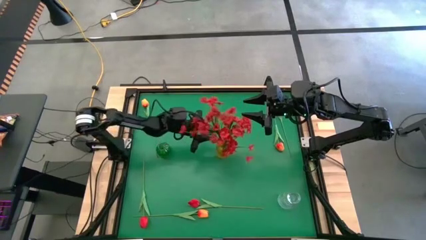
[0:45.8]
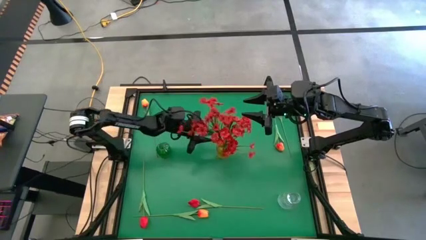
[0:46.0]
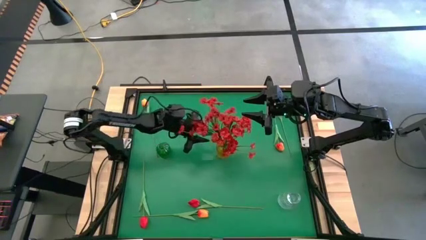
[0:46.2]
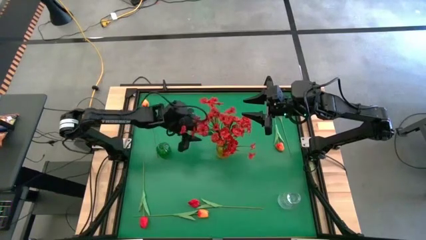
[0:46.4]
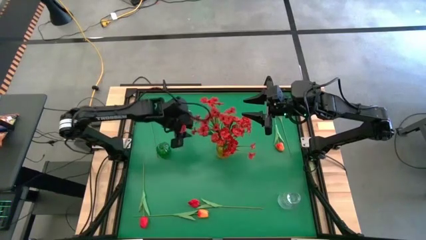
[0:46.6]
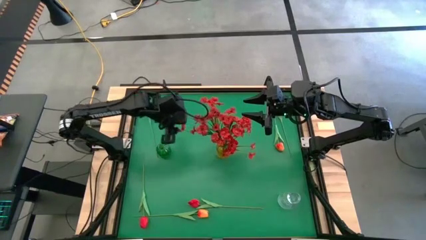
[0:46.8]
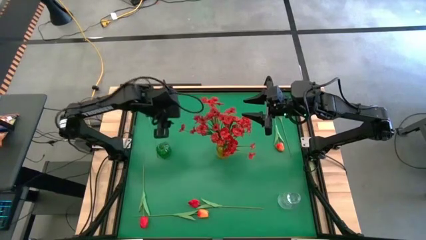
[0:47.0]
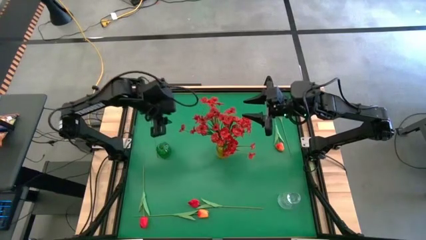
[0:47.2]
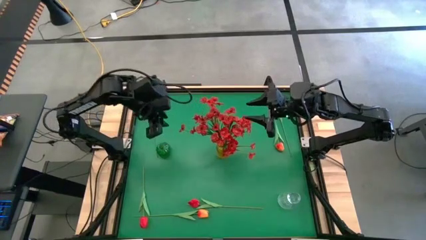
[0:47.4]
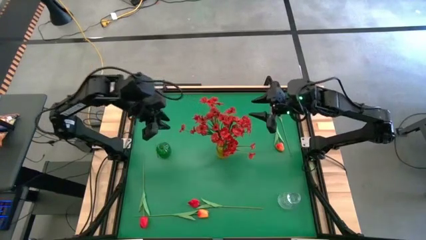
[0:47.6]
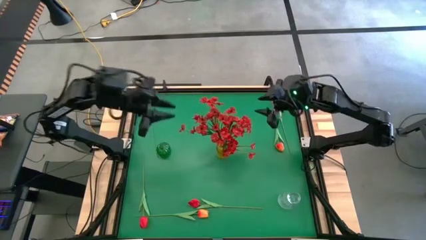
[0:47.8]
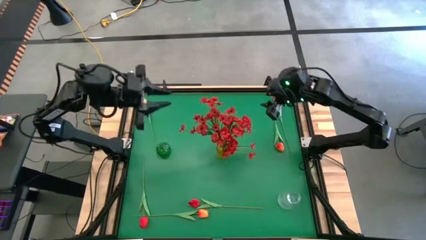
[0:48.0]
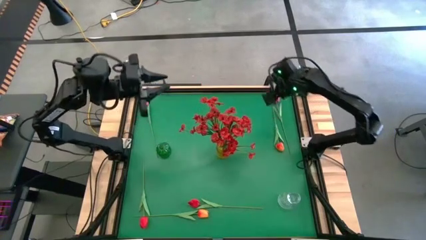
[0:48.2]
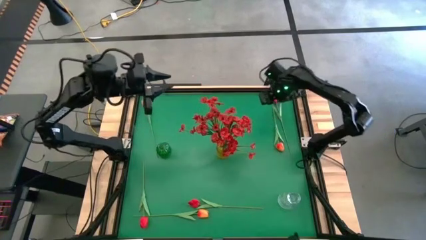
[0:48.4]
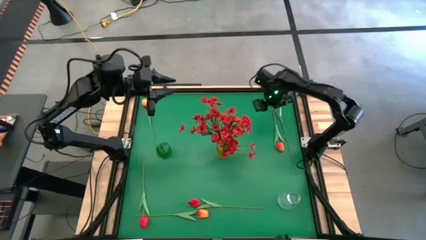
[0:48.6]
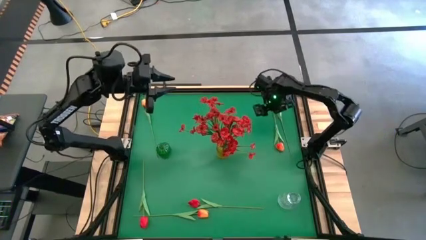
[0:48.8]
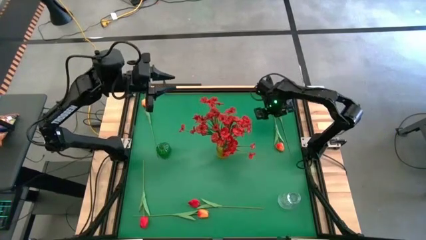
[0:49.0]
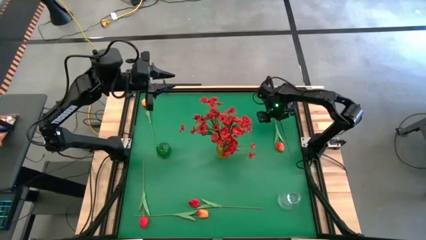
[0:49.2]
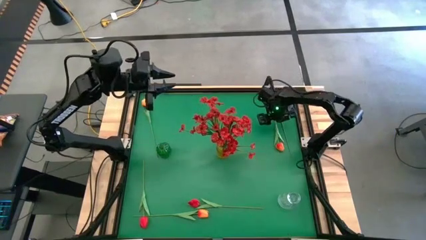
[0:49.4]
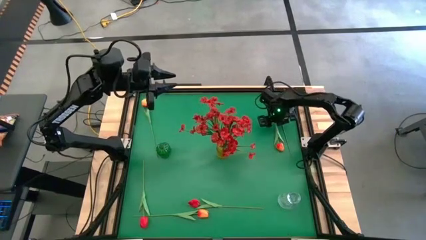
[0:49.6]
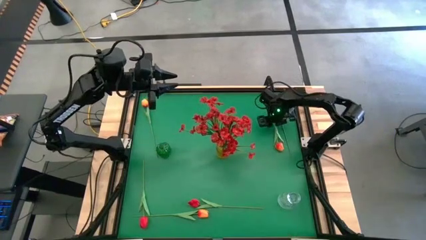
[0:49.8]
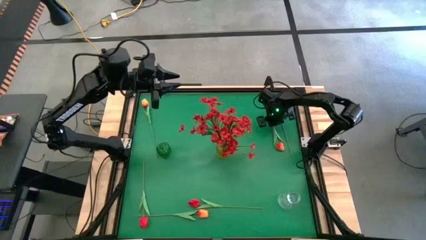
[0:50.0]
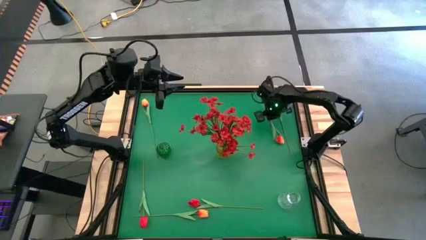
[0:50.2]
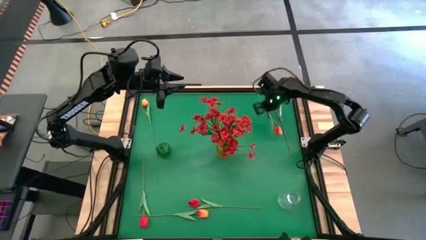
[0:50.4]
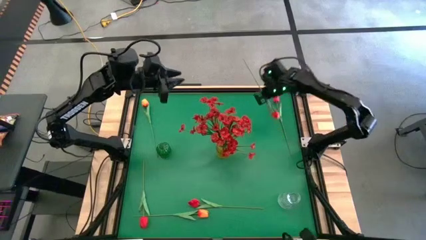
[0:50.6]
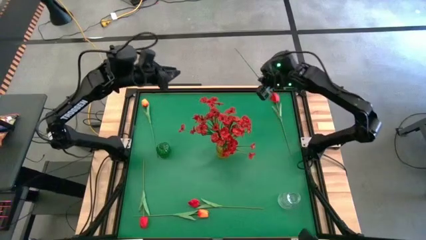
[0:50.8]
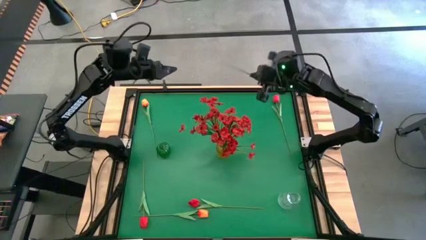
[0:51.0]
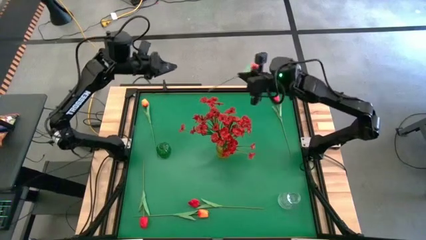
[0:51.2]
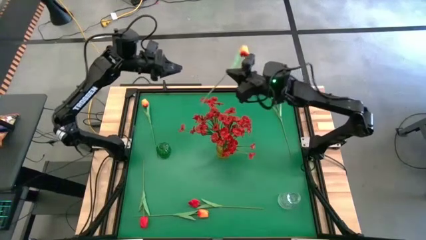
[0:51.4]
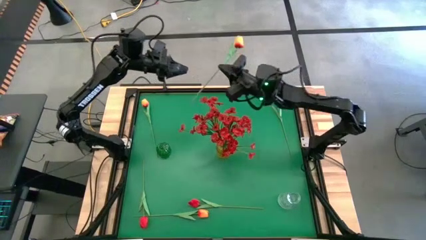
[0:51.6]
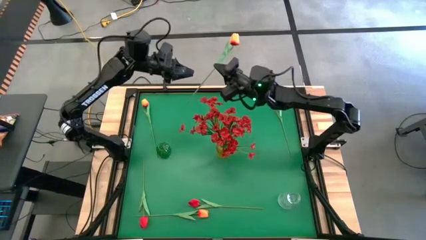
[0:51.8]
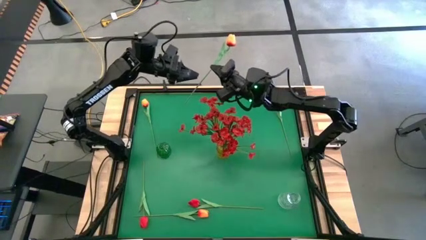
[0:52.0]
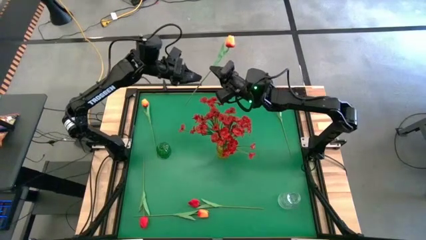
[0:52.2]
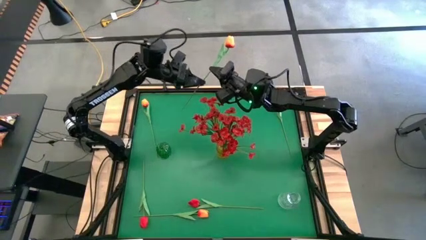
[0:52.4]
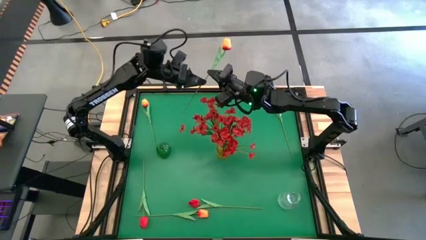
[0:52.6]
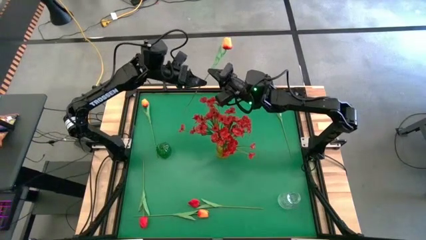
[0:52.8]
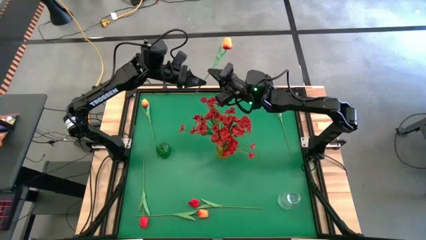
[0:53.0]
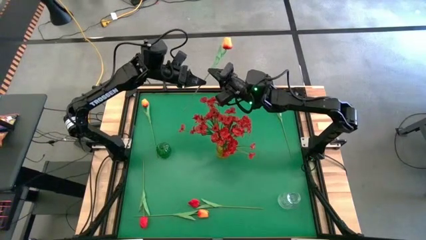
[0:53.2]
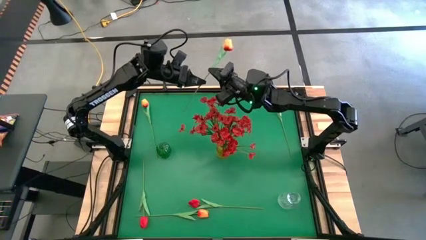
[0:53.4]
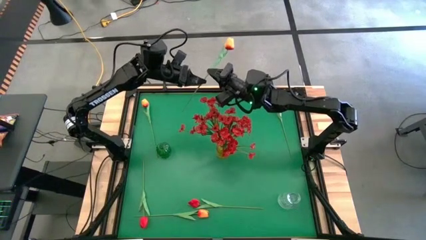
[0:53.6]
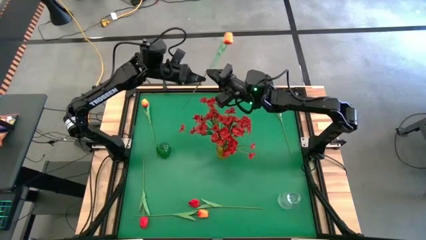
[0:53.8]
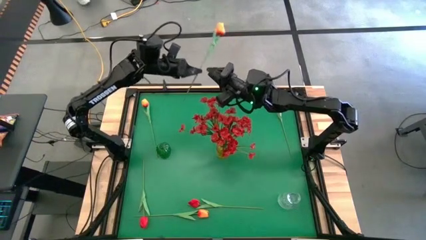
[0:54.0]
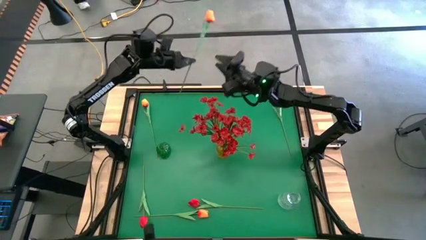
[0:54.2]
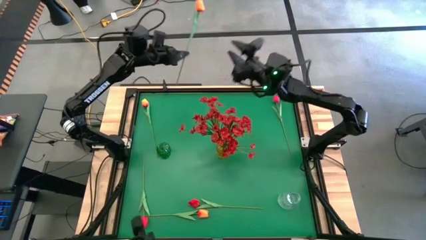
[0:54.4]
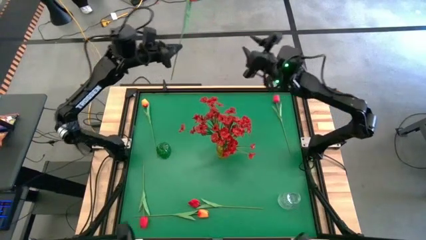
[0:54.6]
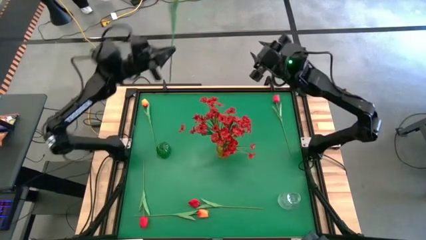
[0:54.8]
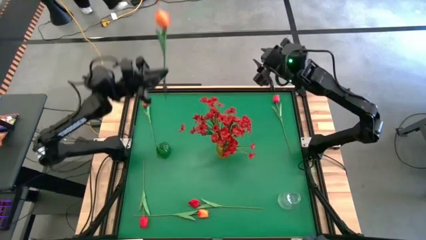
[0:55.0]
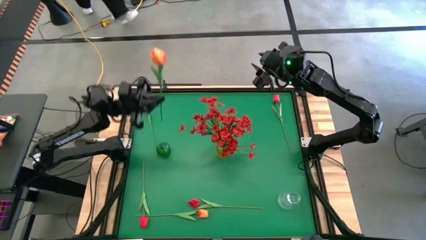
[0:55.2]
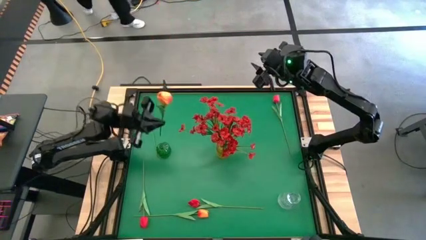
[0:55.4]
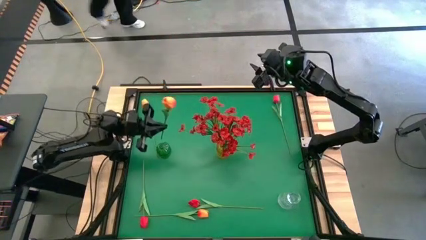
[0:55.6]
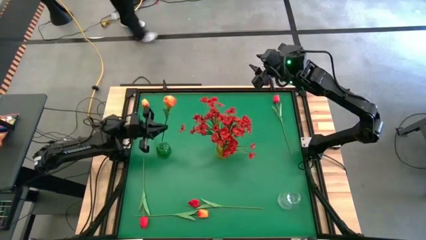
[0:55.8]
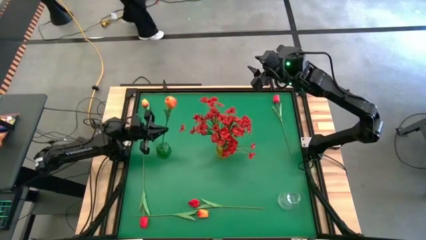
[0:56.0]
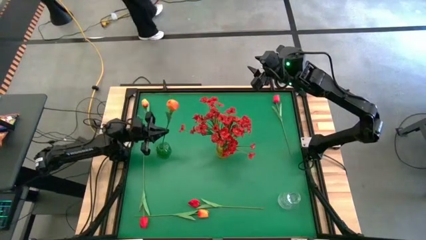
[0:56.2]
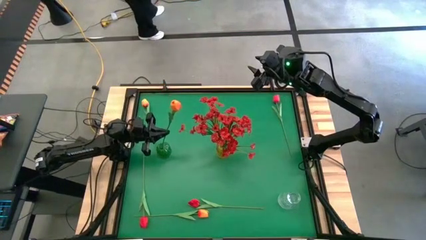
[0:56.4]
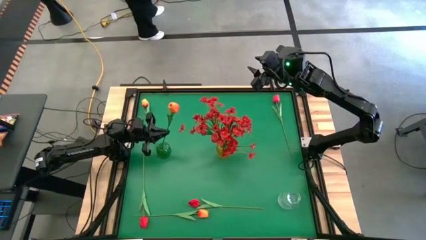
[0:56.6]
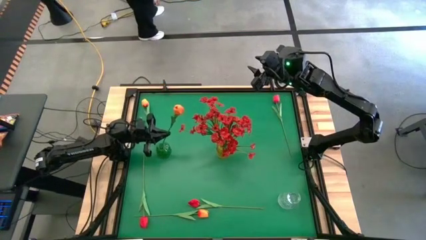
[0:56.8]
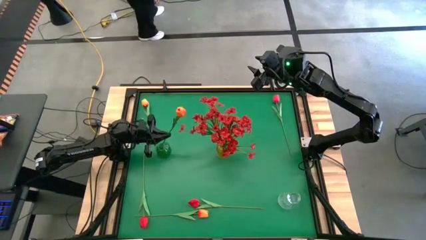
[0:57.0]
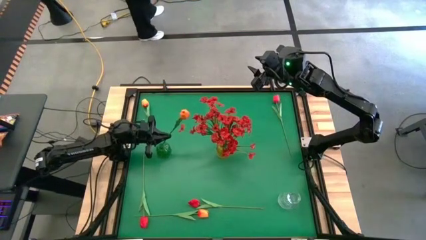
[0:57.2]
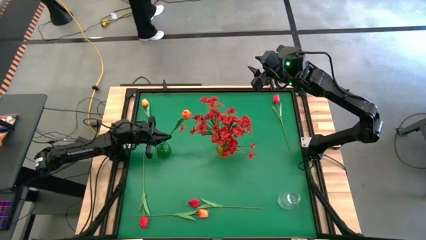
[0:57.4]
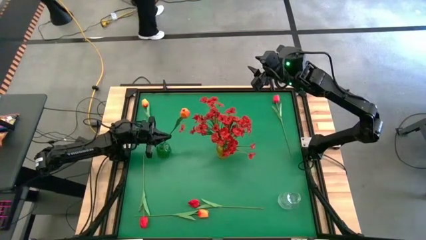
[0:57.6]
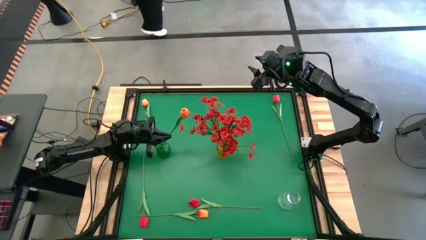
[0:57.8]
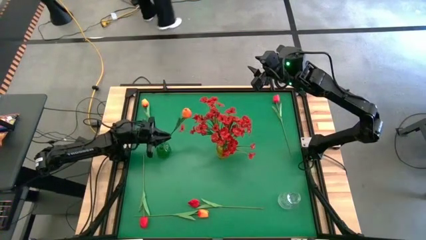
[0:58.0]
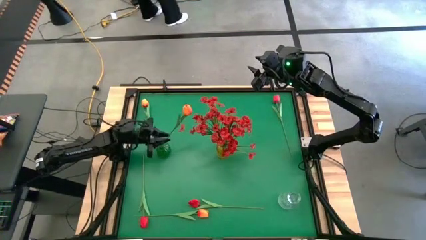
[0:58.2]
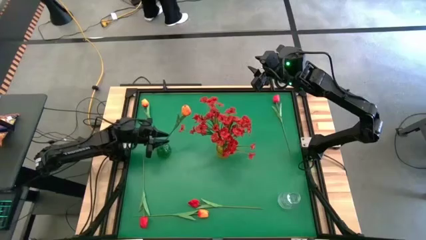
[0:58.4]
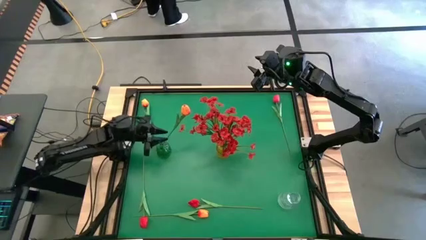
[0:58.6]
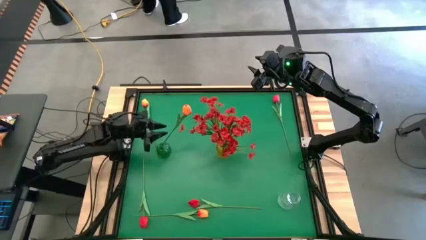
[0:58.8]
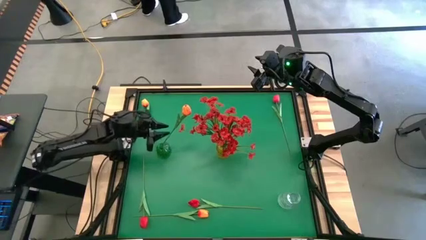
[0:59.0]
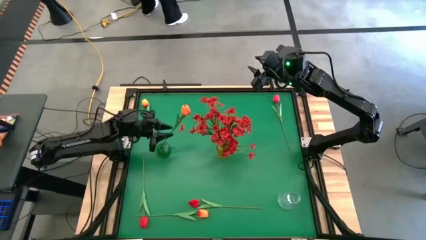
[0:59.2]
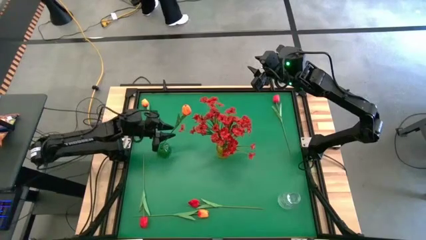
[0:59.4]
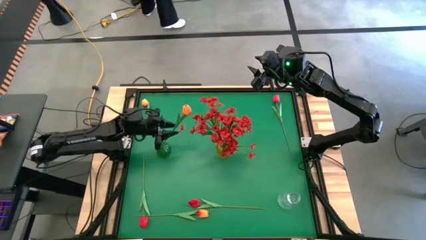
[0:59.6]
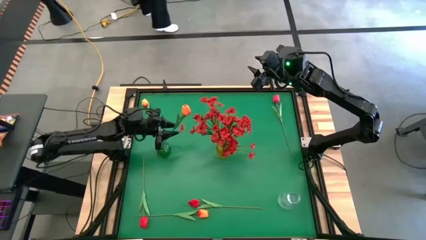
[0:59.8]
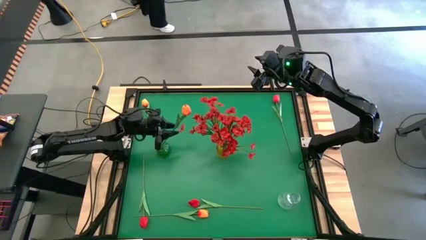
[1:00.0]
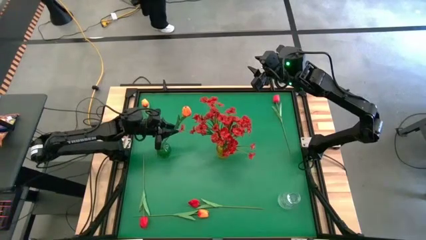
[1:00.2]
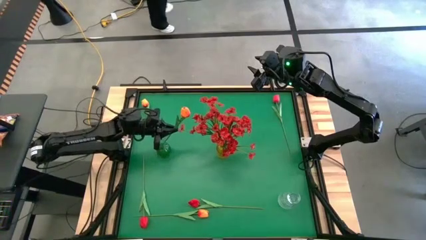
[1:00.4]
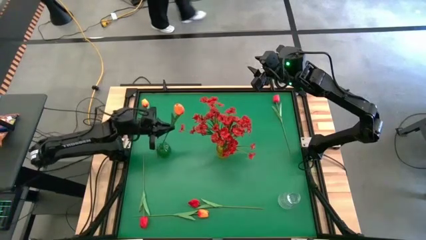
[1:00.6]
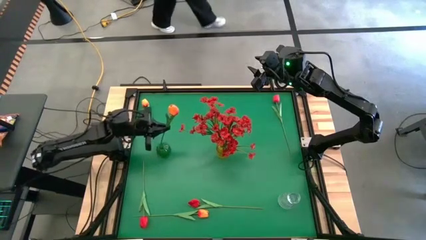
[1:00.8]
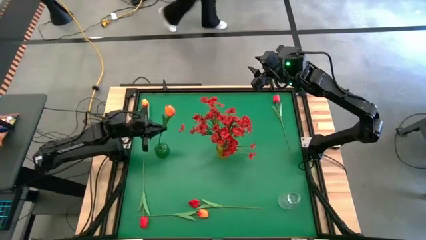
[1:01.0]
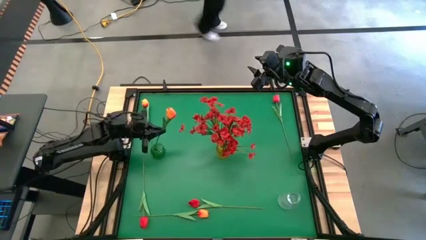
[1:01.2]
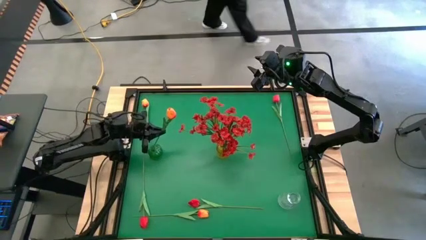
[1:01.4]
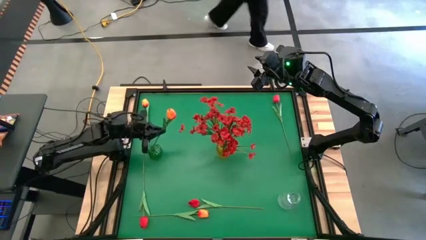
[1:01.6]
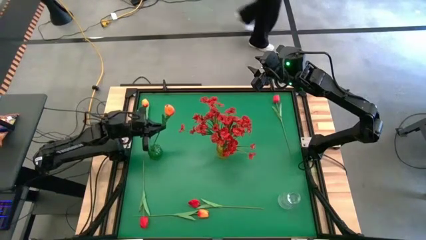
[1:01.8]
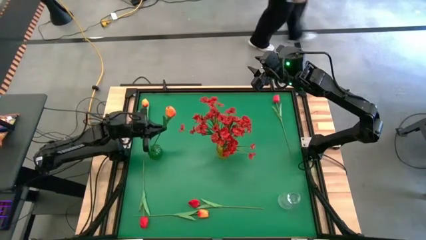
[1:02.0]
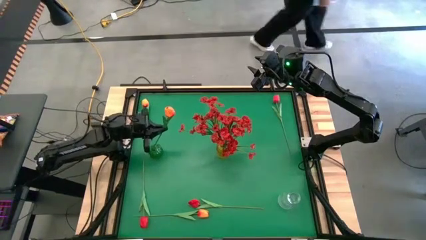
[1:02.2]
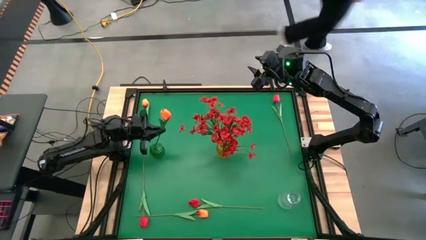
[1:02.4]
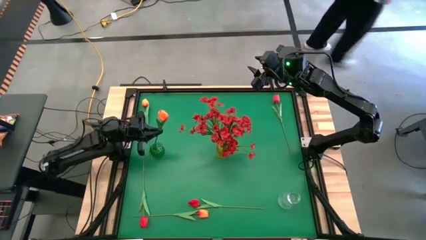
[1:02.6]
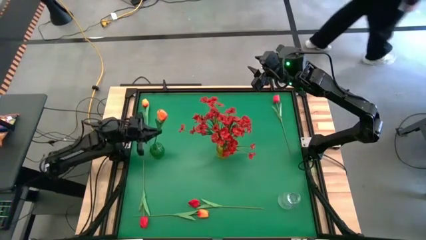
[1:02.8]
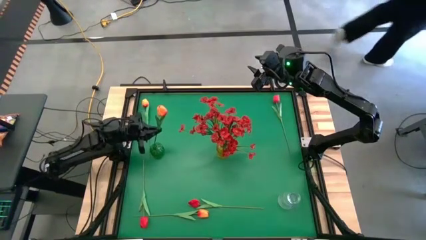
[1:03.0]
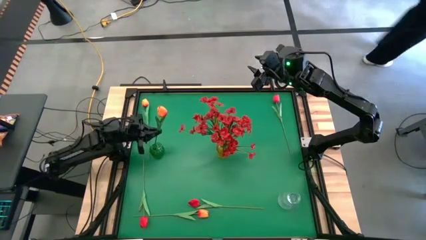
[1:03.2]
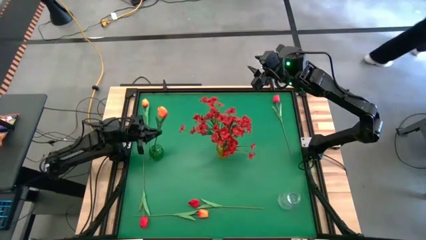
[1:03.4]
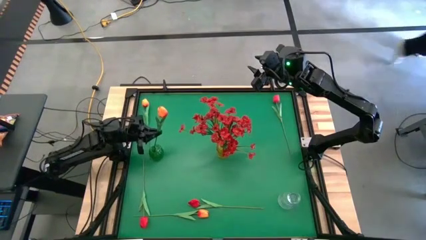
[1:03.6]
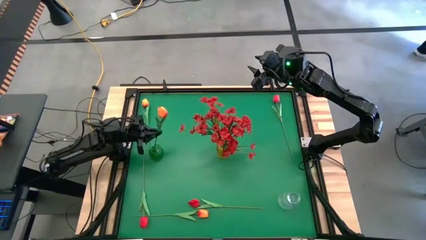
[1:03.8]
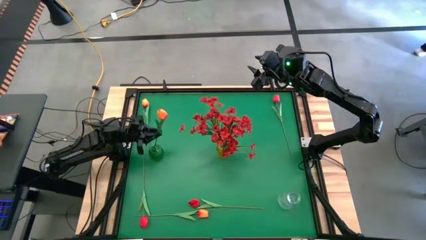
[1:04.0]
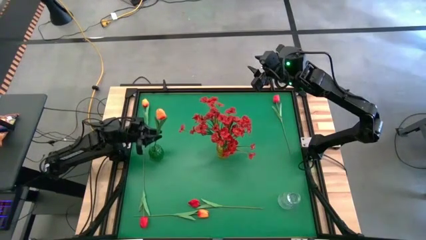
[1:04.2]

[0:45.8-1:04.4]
Task: Sort flowers into vase by color
Put the top right orange flower into the green vase
